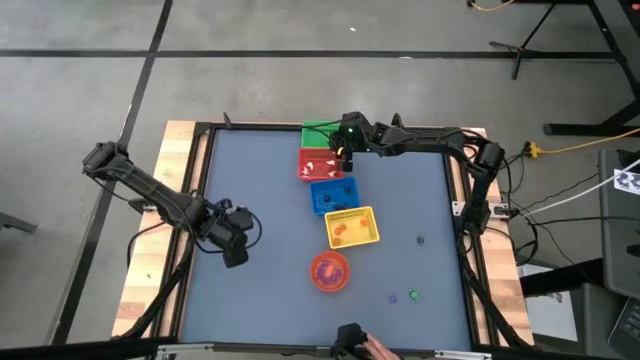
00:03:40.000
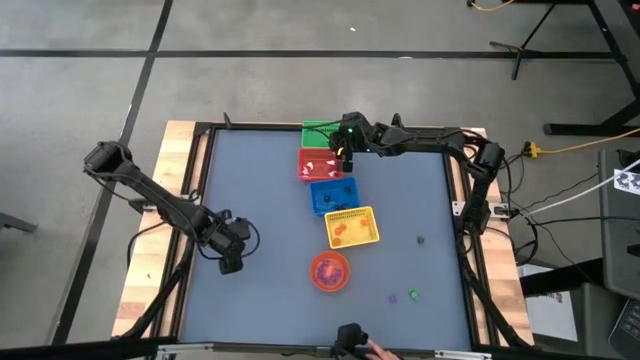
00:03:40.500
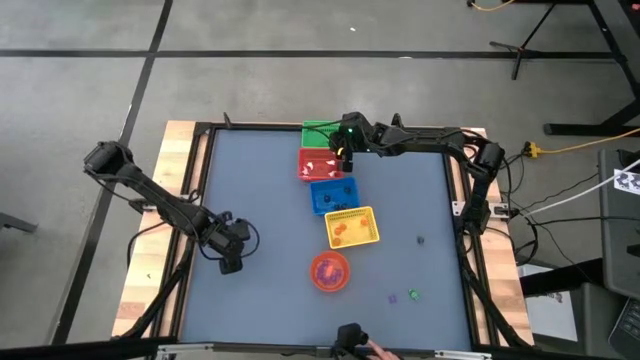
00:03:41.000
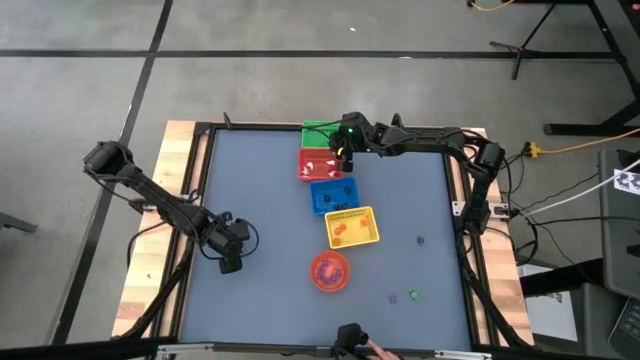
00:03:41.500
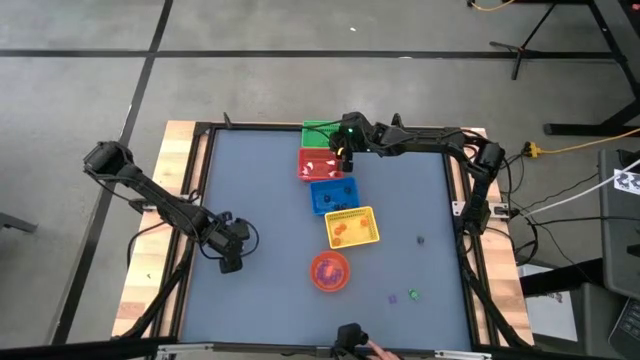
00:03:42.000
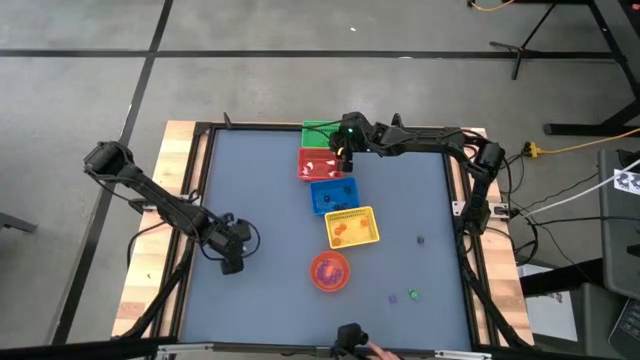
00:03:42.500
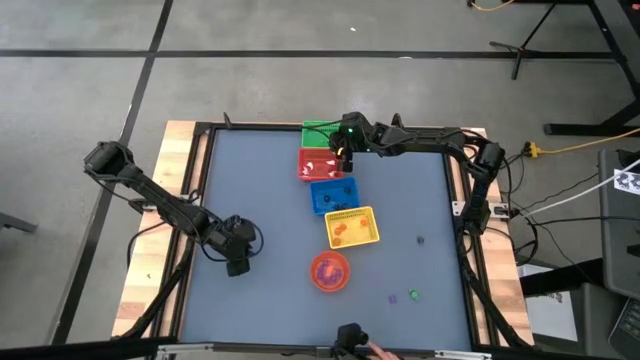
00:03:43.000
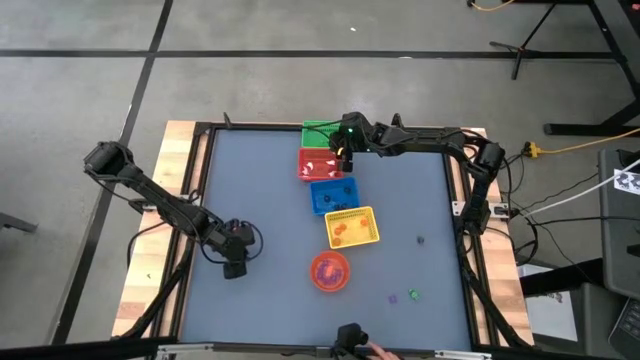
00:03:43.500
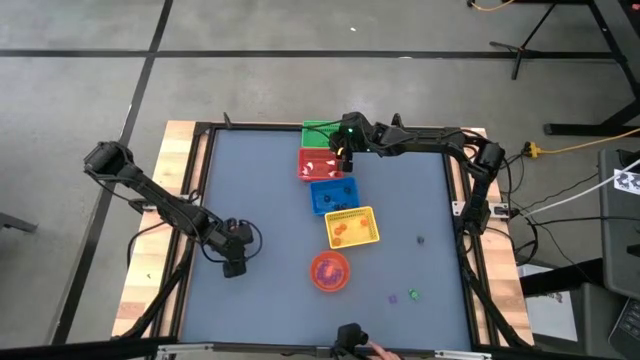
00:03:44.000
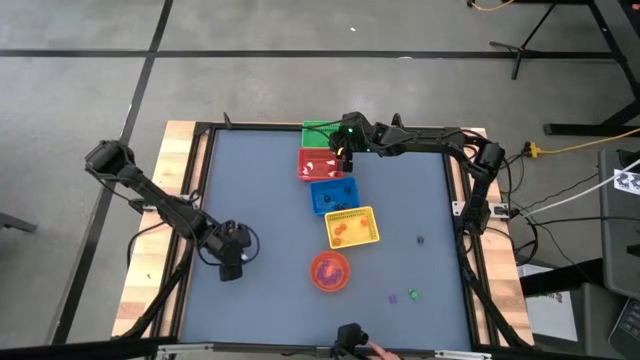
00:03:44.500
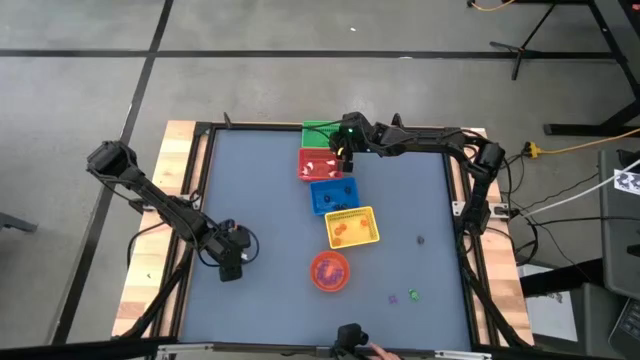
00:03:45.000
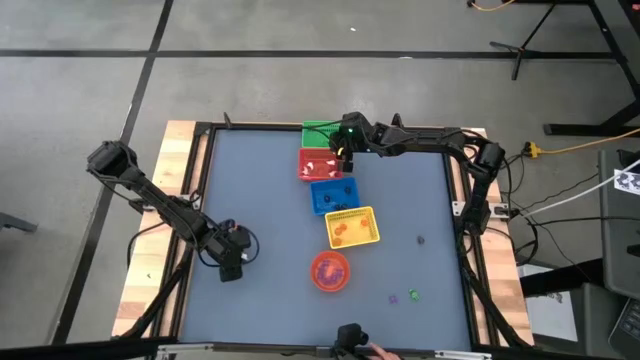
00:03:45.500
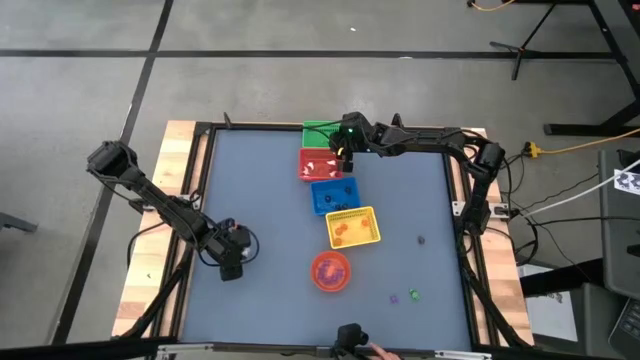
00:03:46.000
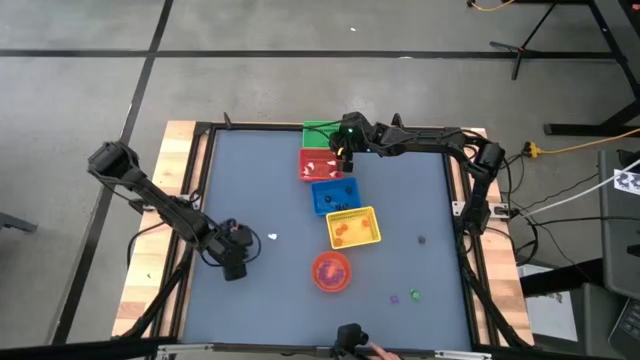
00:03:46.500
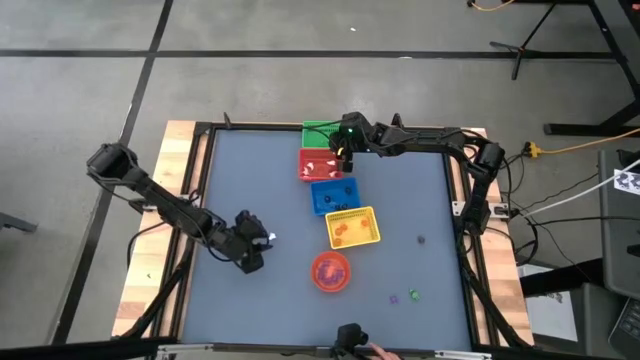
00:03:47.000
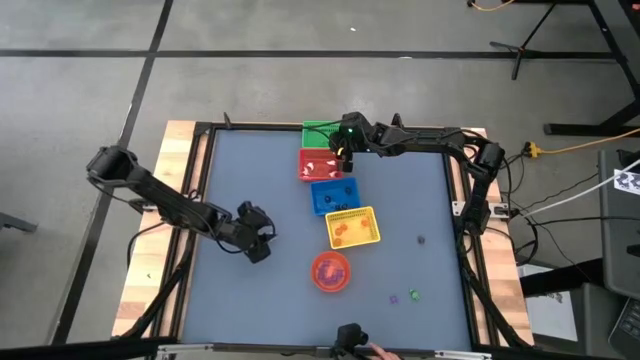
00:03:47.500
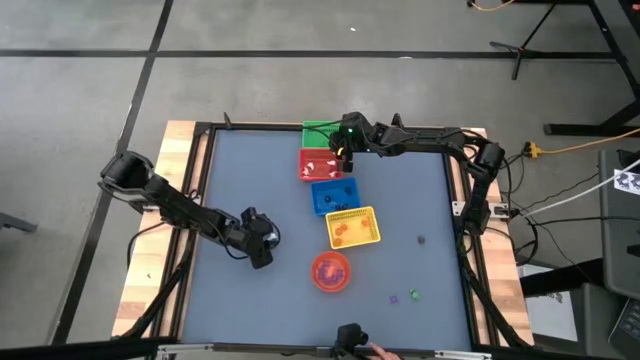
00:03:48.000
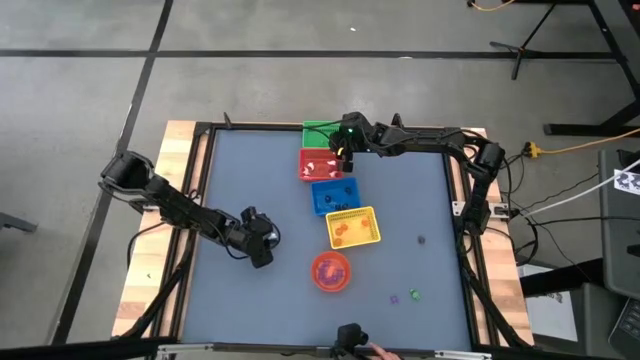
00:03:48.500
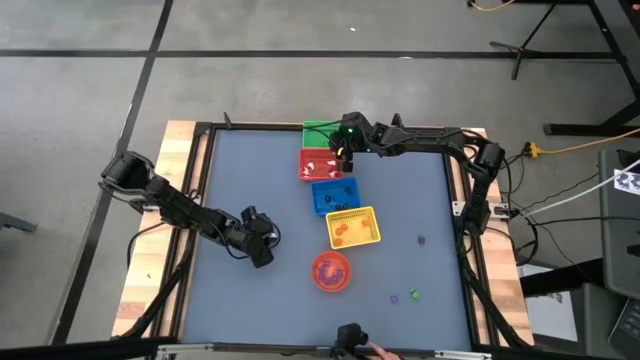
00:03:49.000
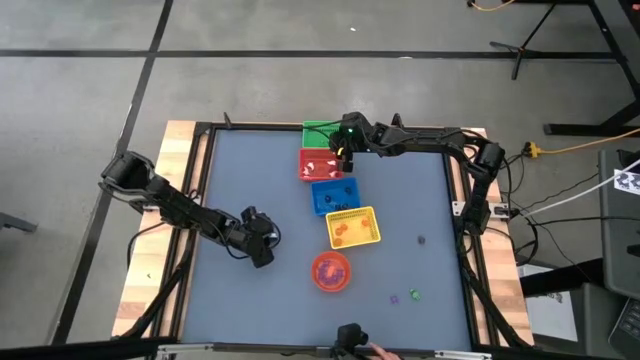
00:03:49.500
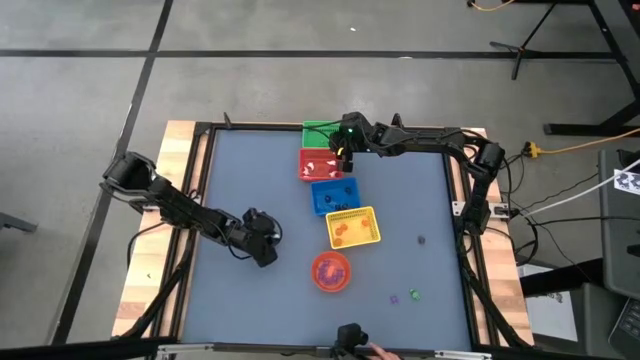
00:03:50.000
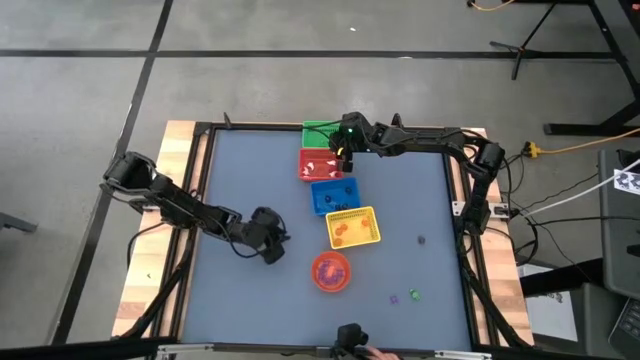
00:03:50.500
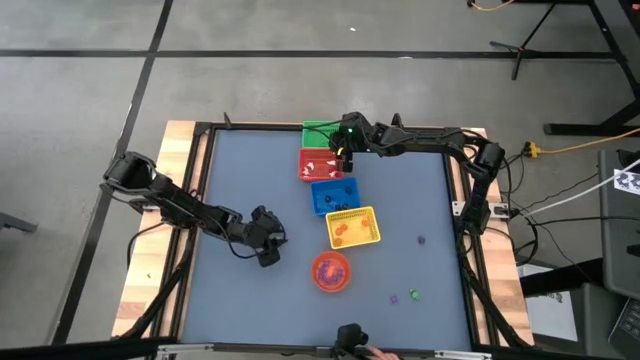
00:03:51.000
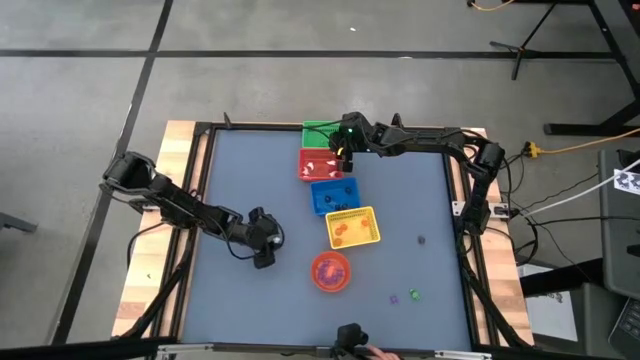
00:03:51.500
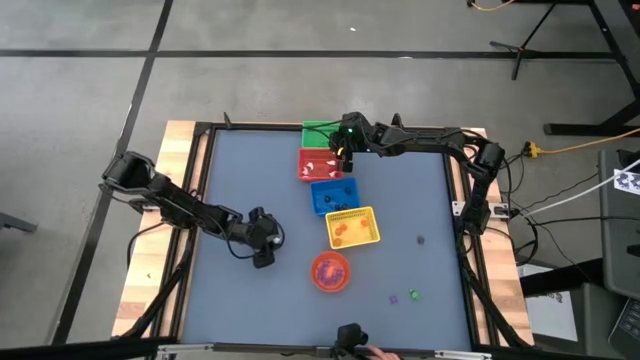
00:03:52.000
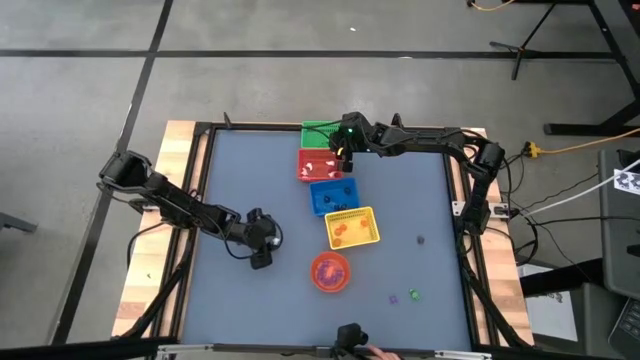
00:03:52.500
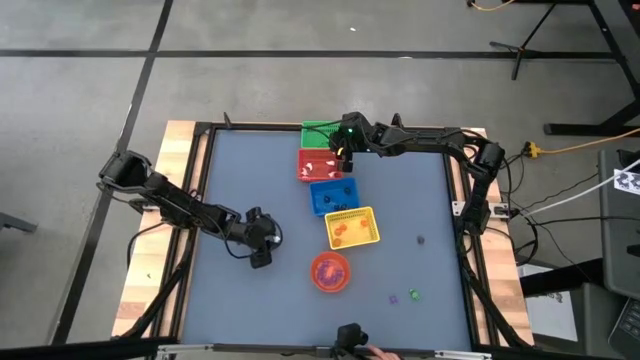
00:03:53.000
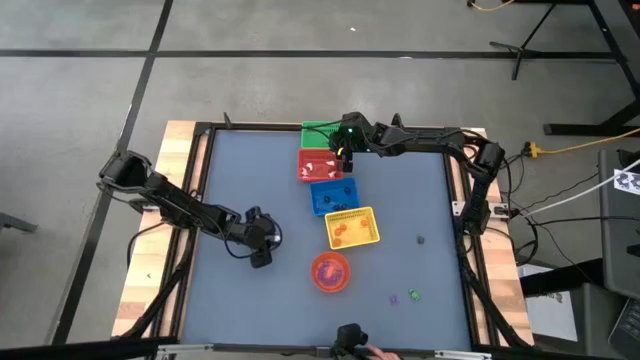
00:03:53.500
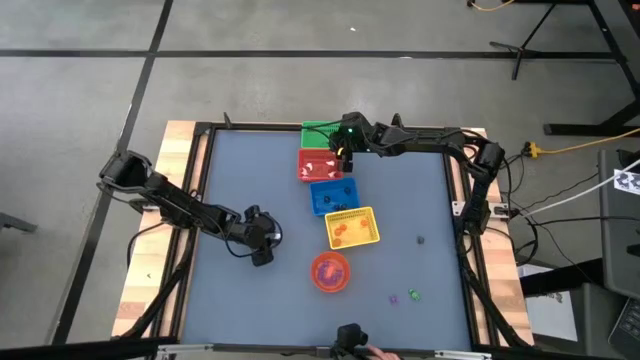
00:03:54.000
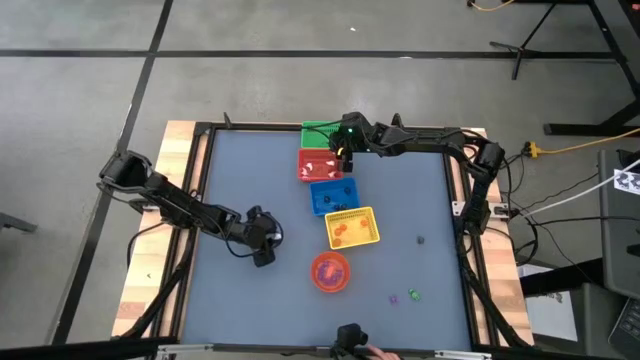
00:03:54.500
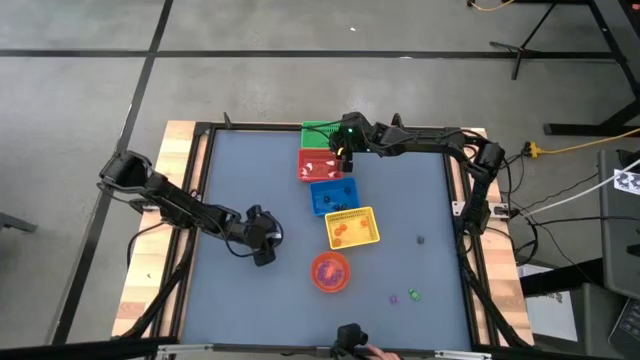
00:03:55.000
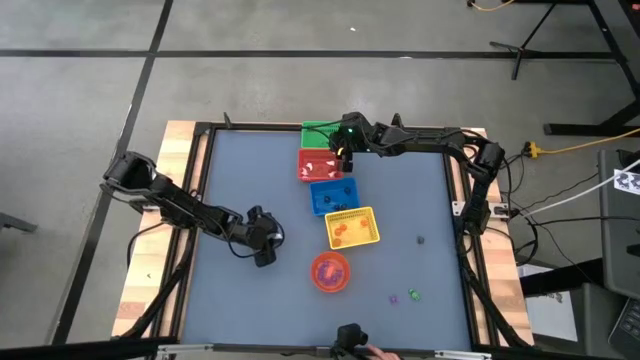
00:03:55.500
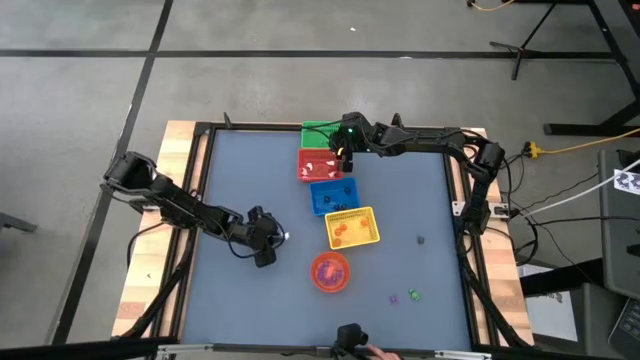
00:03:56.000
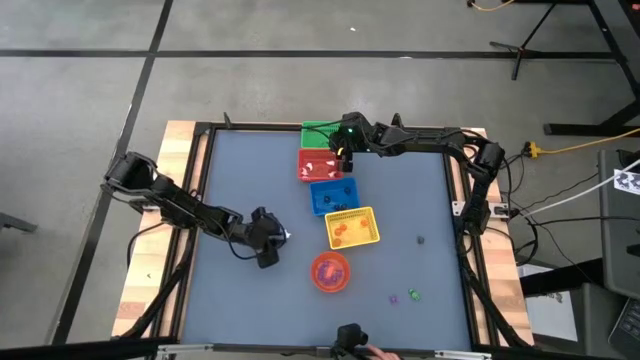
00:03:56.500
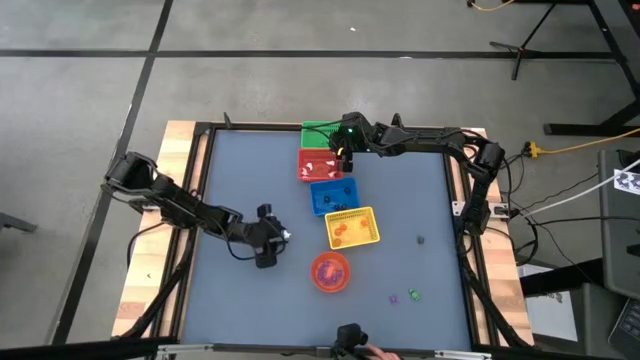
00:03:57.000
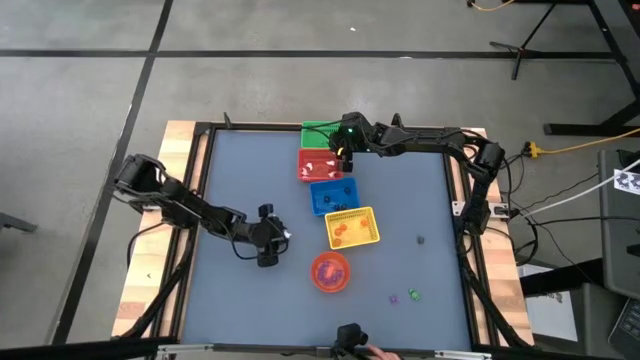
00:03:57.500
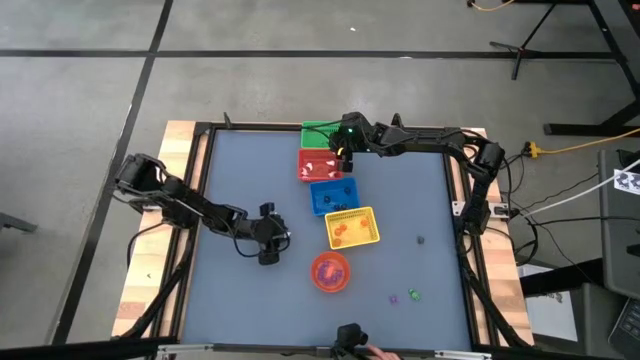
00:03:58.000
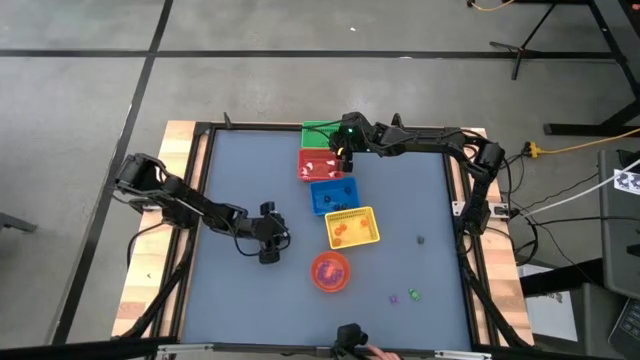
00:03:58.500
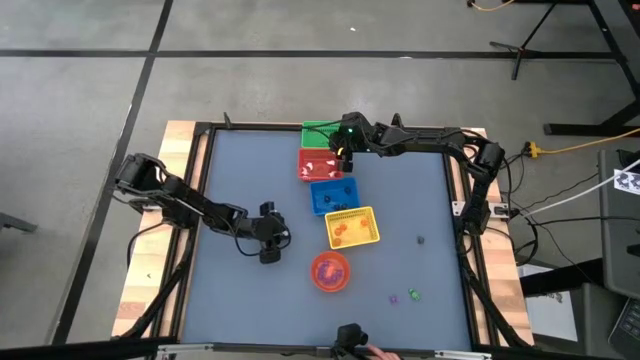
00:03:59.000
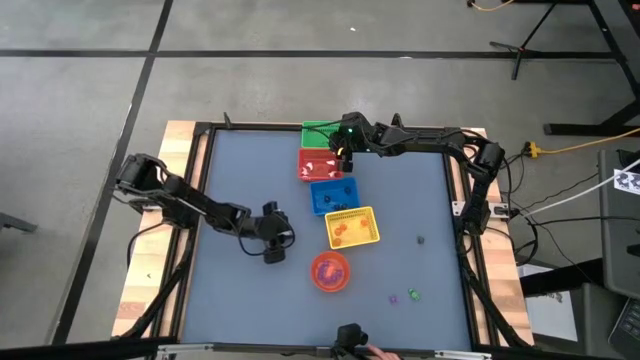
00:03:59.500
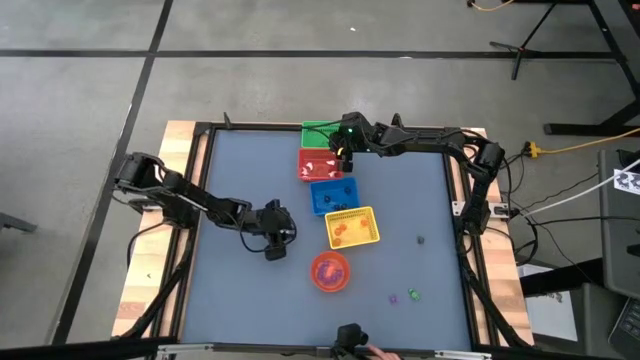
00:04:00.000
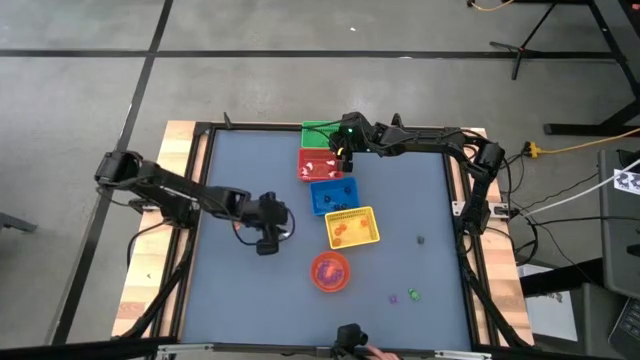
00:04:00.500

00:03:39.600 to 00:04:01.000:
Task: Sort Halloween decoration
Put the white ghost toy into the red bin

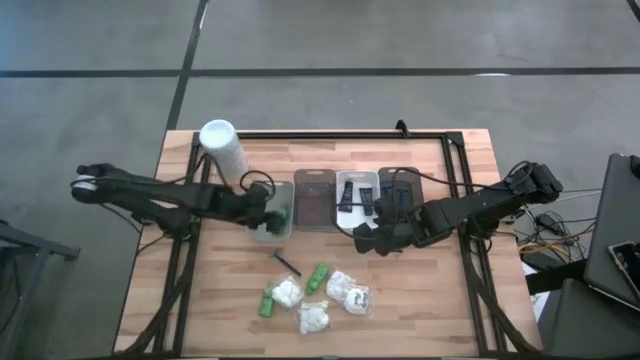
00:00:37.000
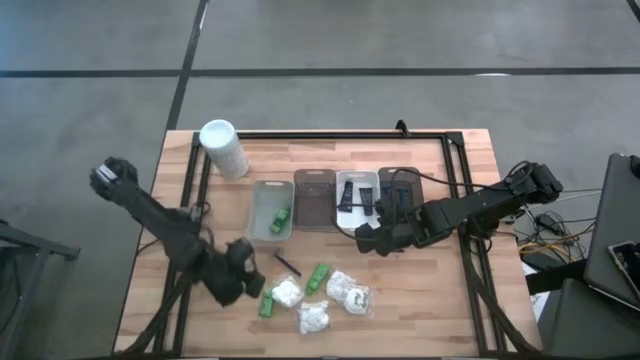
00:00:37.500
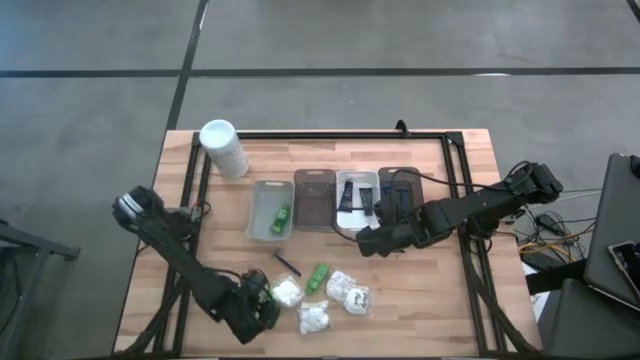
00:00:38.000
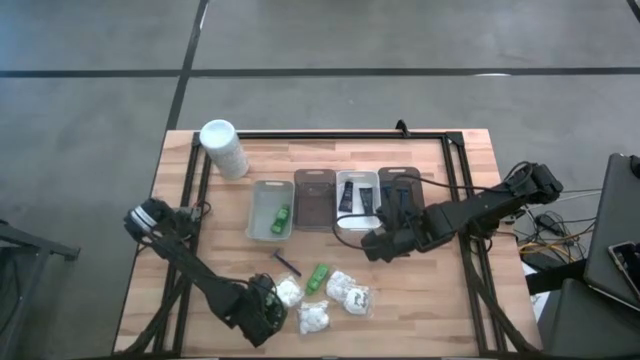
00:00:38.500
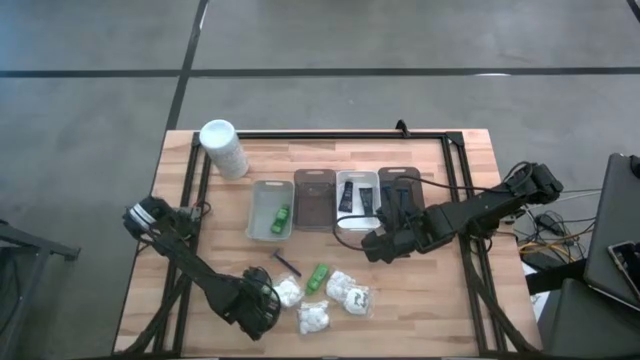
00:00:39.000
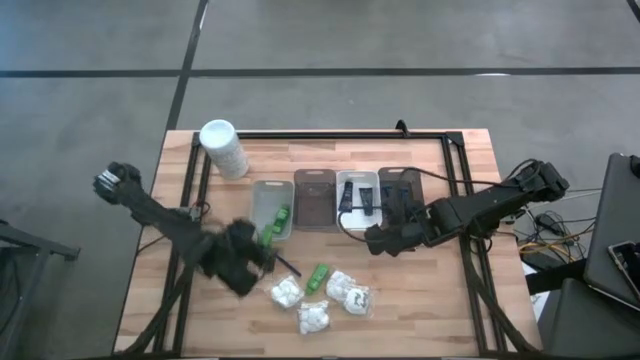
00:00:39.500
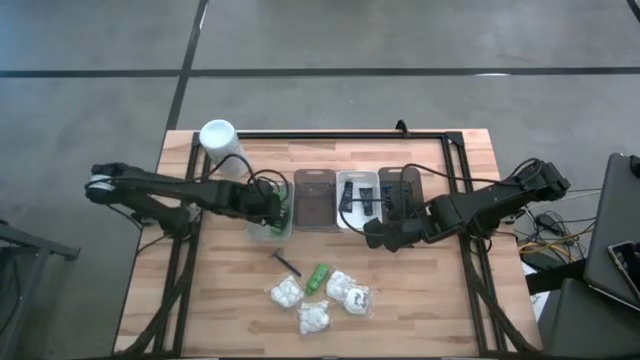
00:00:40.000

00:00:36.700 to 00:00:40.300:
Task: Pick & Place Travel size toiletries
Put the left green shampoo into the gray bin
